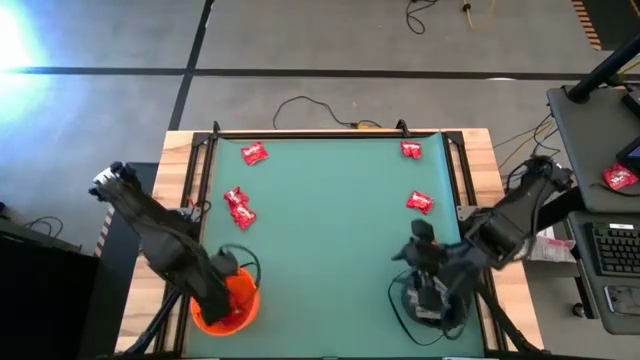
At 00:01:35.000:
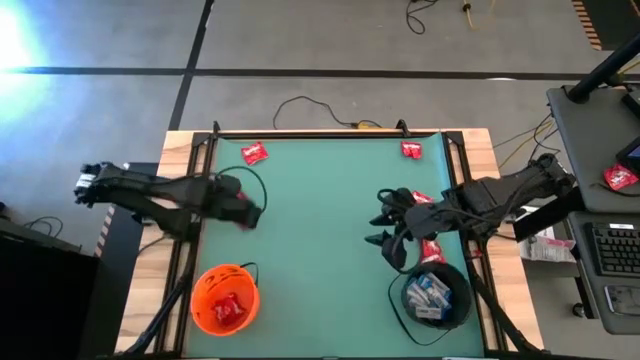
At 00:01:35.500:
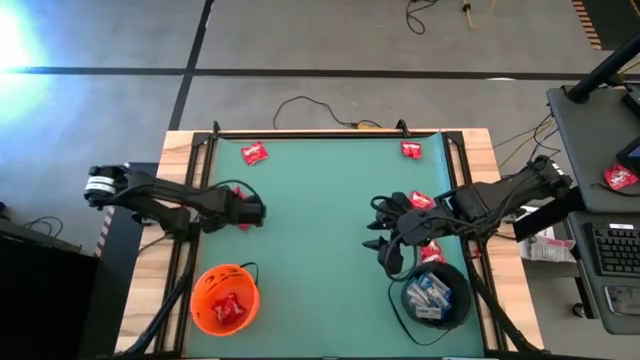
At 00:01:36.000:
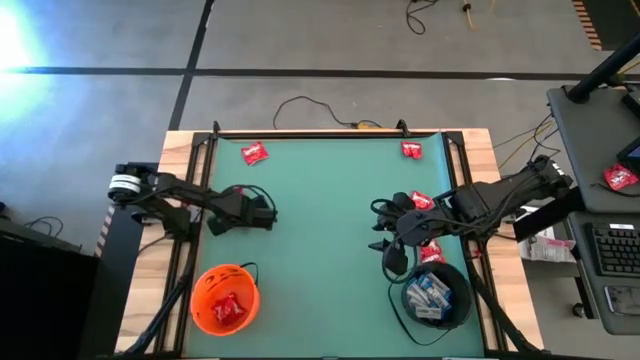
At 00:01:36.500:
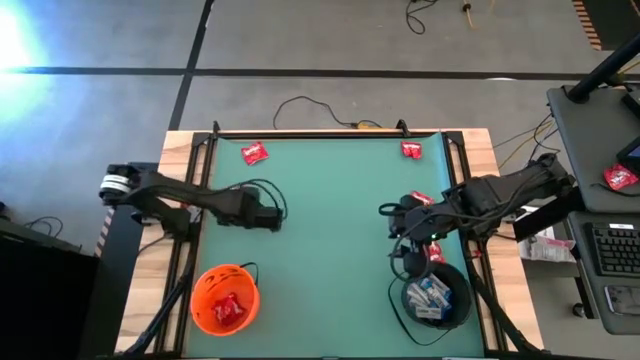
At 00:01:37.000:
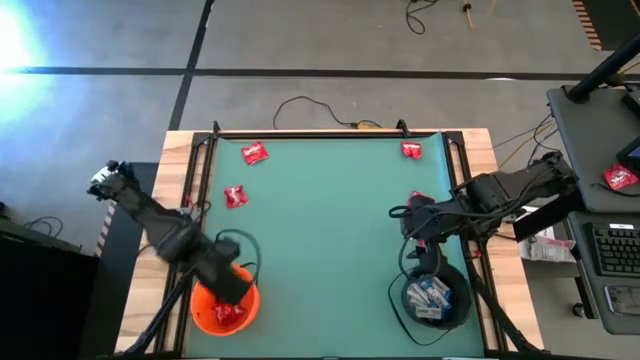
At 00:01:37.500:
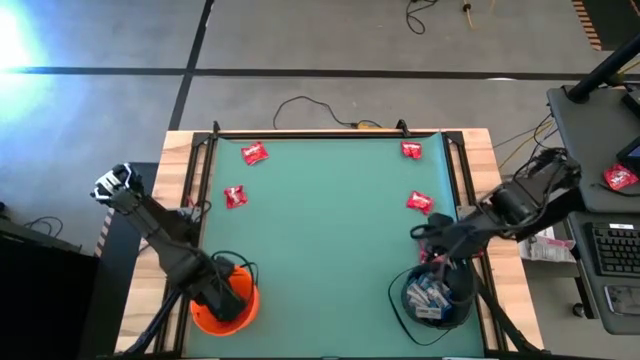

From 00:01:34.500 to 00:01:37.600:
Task: Sort candy by brand, put in halloween buckets
Put the red chocolate candy into the orange bucket

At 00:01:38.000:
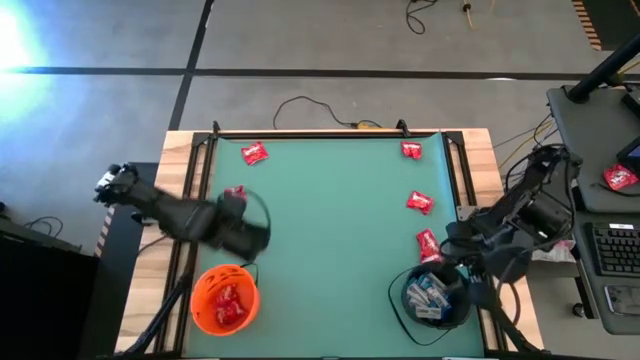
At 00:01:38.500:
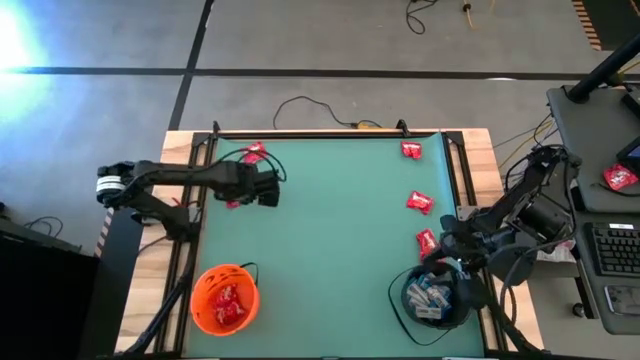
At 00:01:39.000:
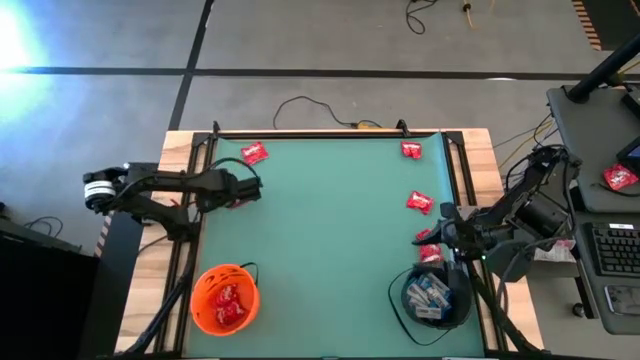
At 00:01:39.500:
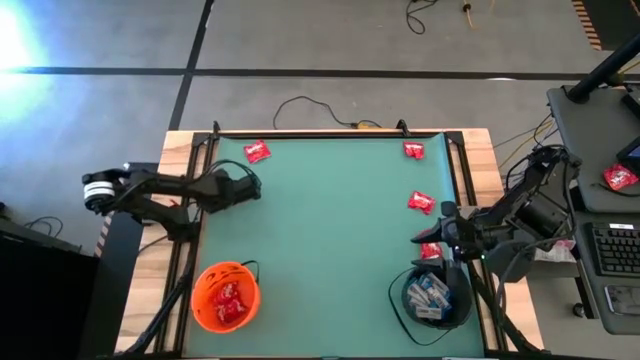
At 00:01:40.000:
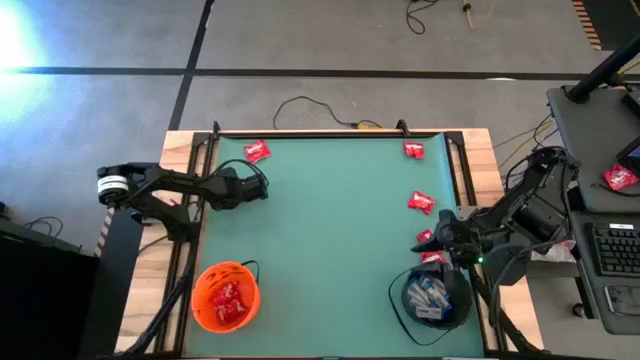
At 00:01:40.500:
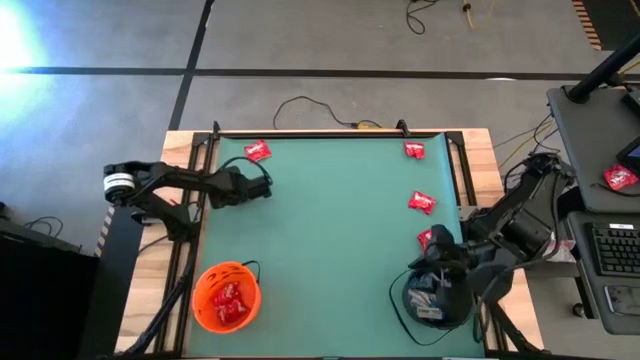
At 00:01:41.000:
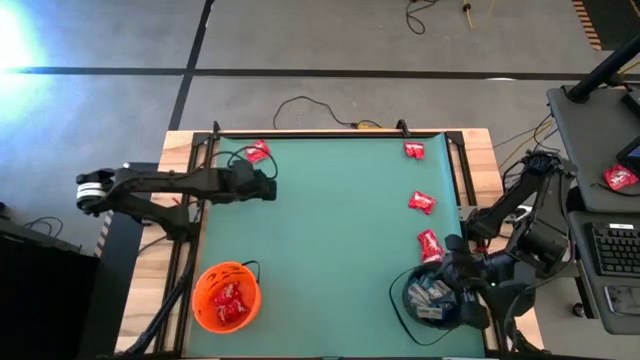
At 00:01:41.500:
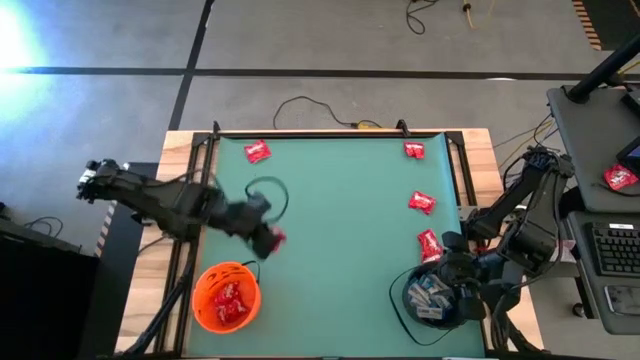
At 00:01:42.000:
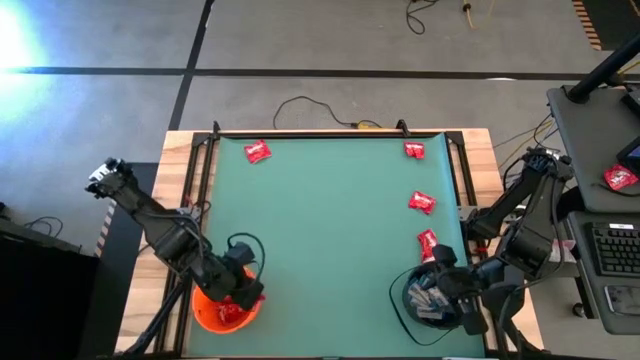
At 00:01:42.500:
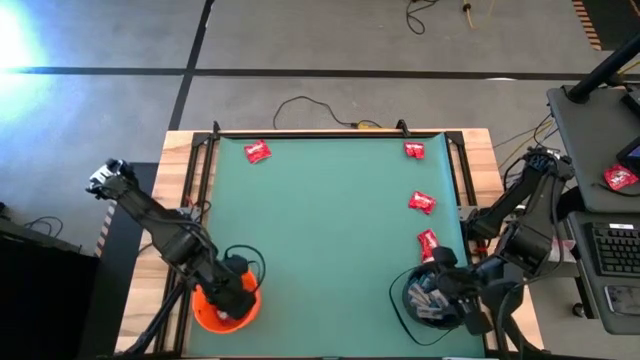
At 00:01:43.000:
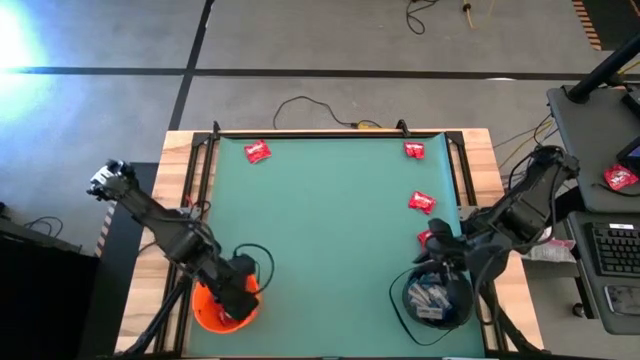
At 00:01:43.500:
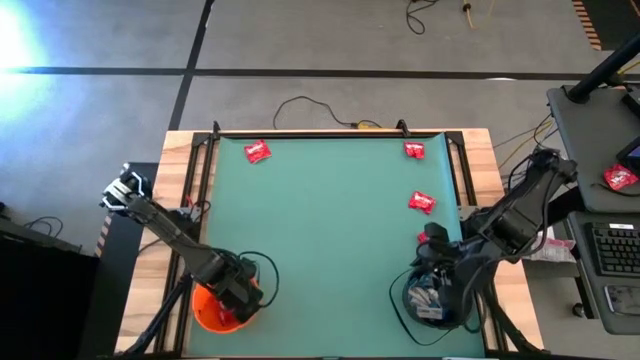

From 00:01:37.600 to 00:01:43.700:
Put the red chocolate candy into the orange bucket

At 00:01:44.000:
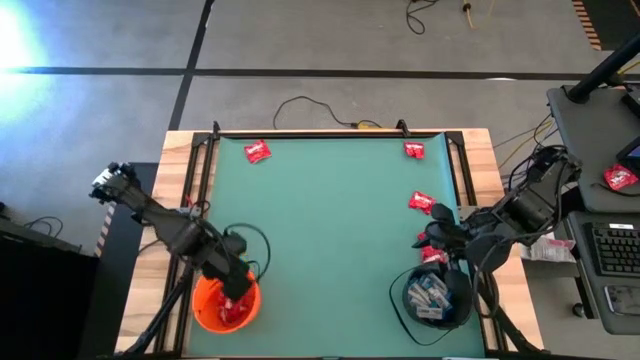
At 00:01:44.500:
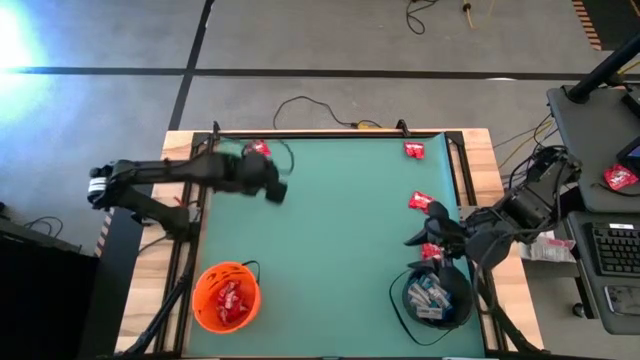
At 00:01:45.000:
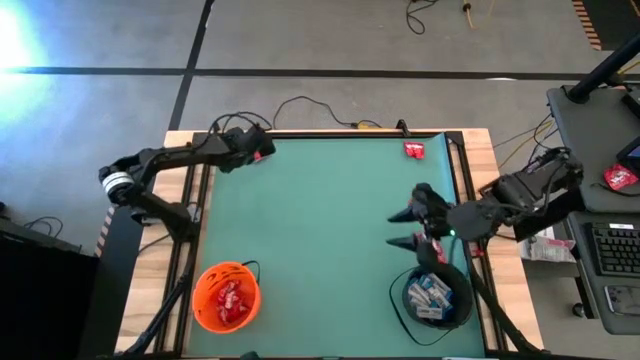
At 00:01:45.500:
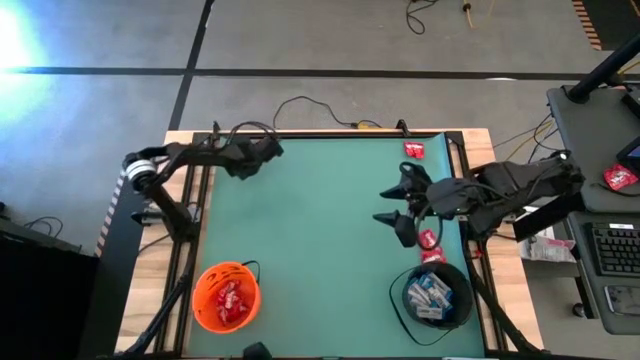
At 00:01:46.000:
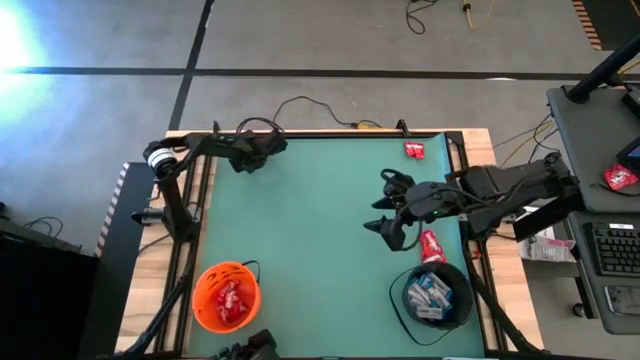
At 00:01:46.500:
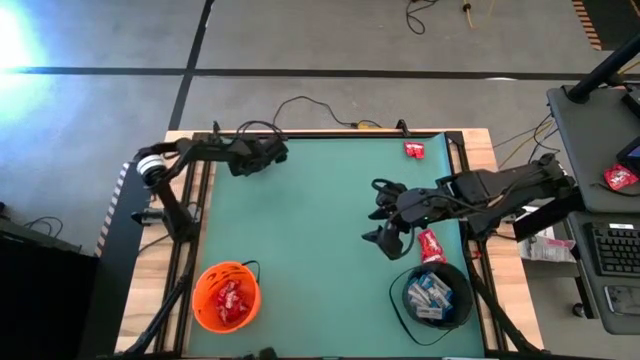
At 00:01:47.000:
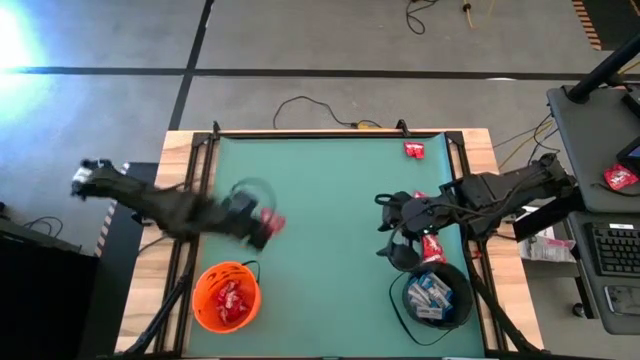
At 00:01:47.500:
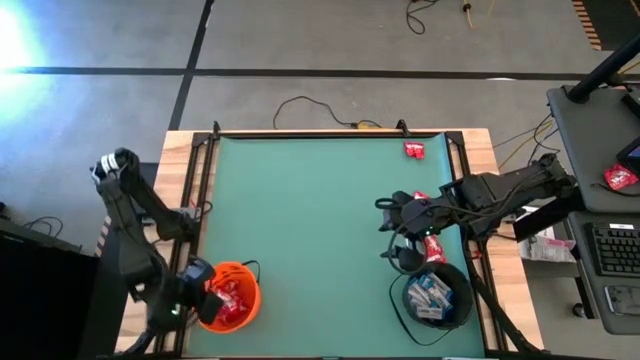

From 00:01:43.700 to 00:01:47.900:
Put the red chocolate candy into the orange bin

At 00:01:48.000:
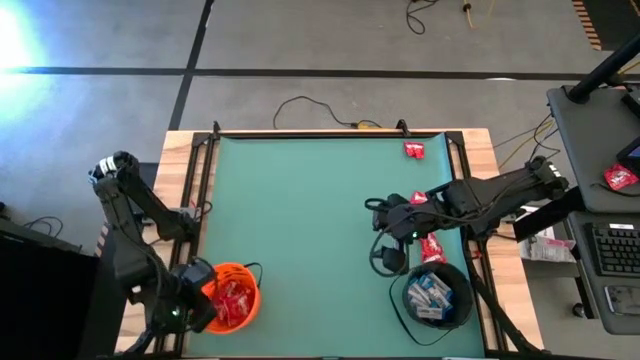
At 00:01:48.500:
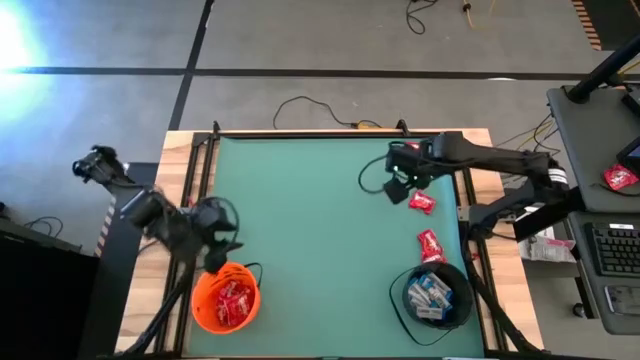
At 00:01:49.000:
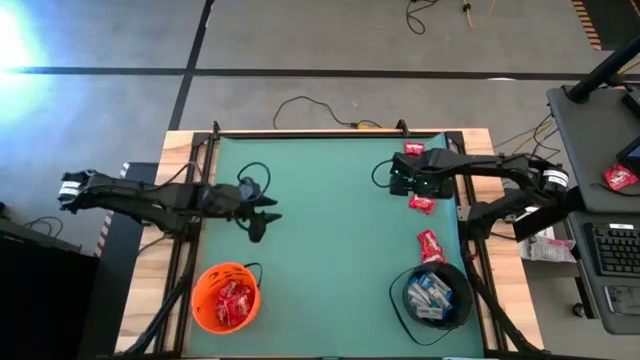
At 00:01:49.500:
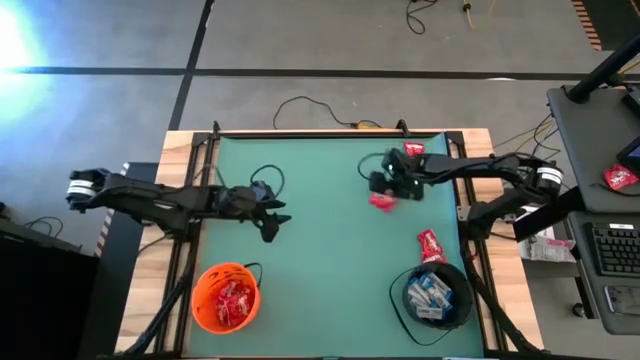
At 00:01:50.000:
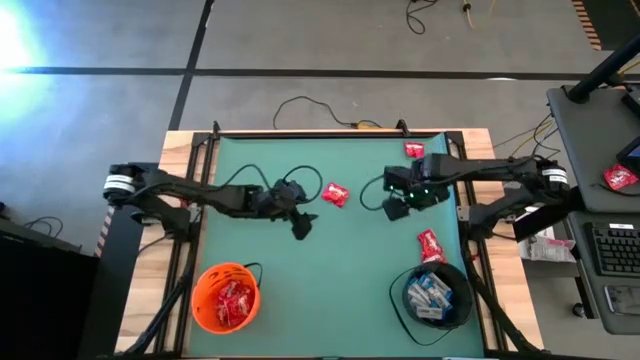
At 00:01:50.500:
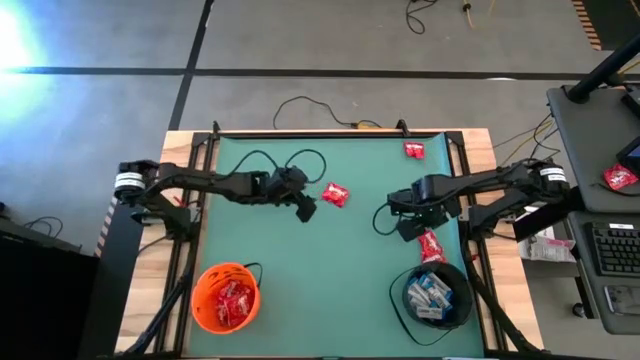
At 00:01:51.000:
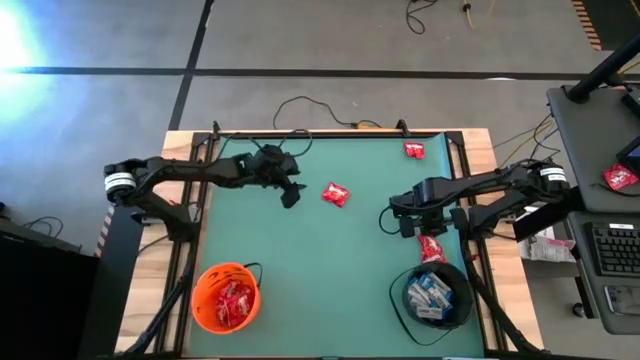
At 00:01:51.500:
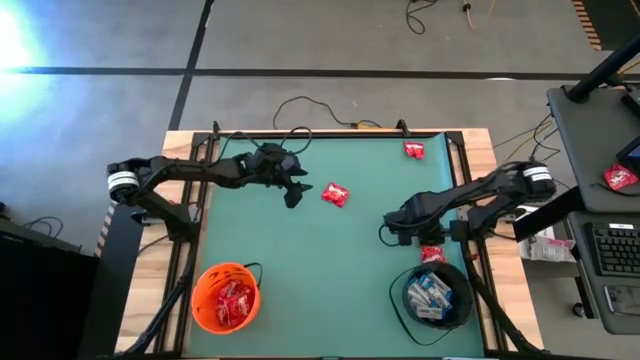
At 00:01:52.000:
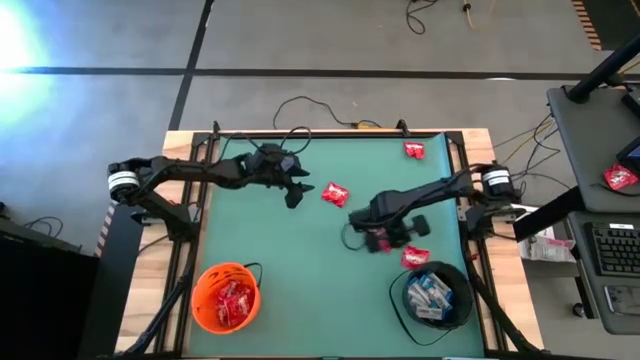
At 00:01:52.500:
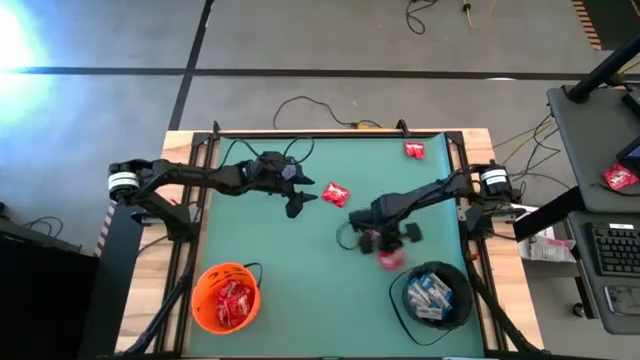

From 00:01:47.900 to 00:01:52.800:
Move the red chocolate candies to the center of the table

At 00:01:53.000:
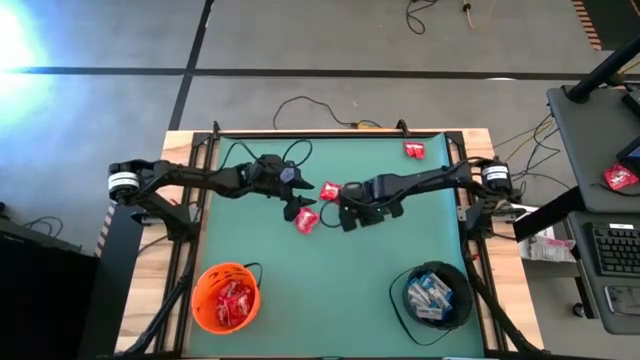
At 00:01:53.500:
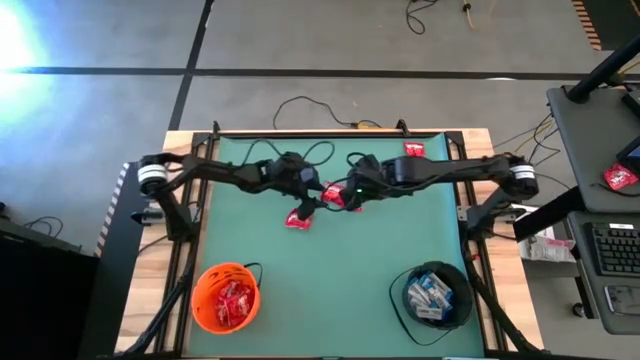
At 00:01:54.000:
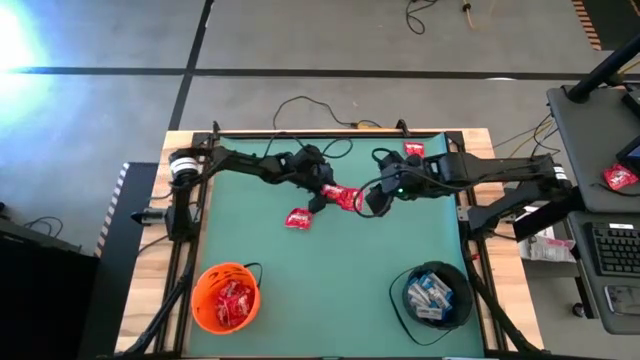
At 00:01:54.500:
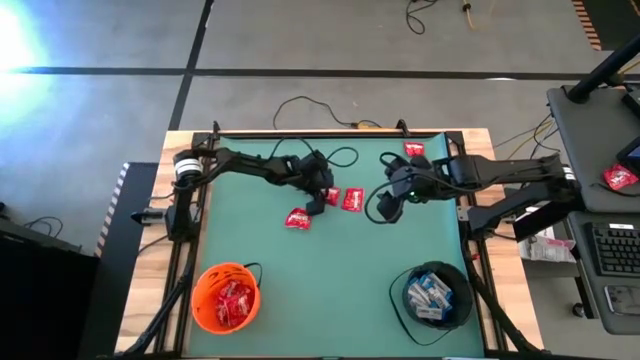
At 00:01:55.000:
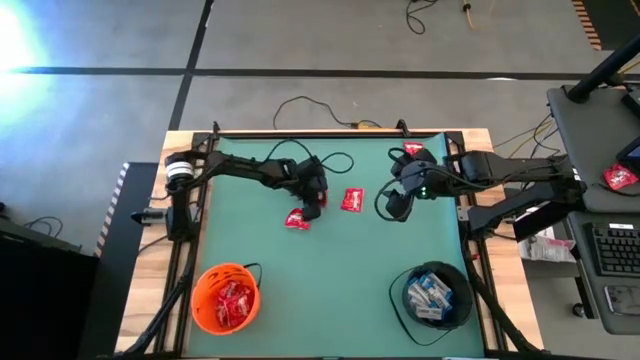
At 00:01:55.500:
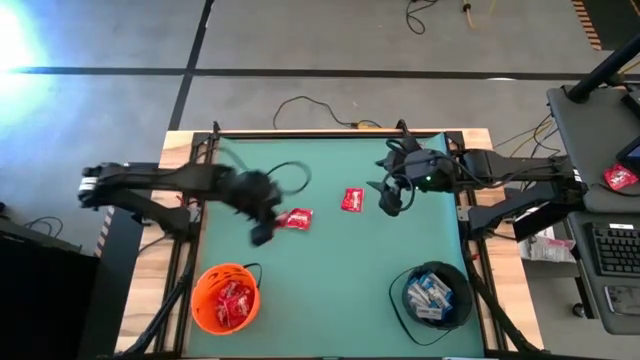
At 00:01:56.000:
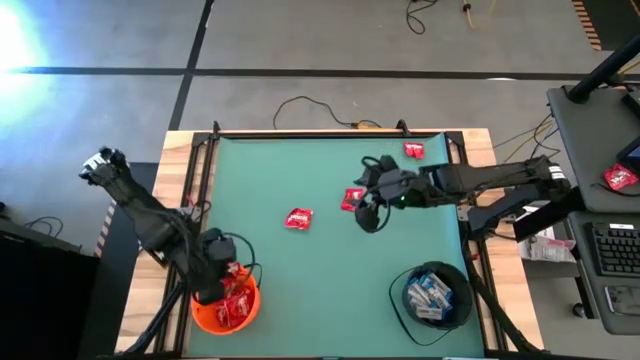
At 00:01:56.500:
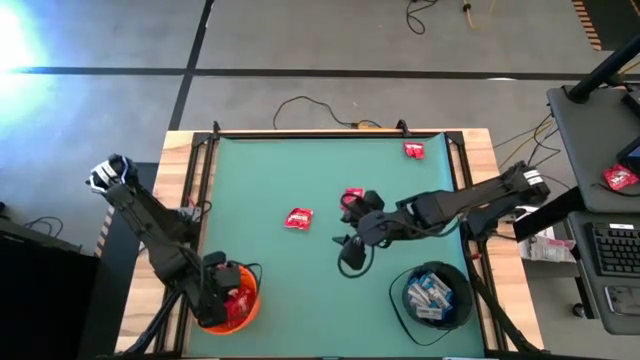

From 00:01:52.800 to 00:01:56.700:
Put the red chocolate candy into the orange bucket
